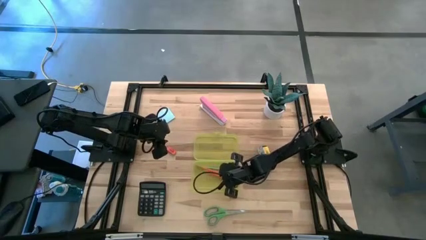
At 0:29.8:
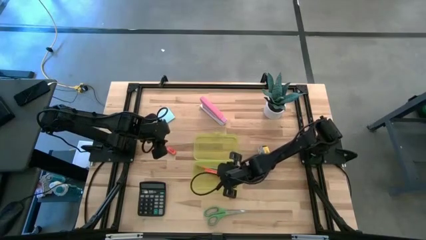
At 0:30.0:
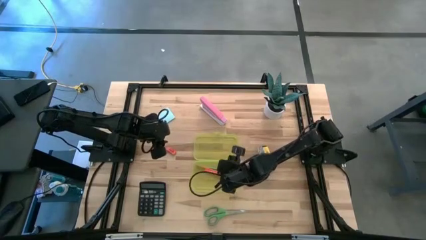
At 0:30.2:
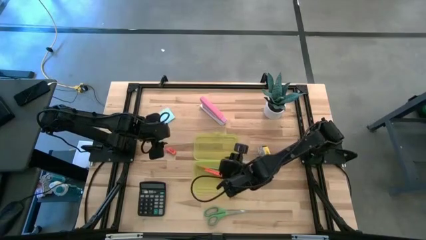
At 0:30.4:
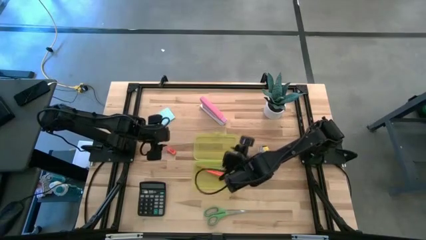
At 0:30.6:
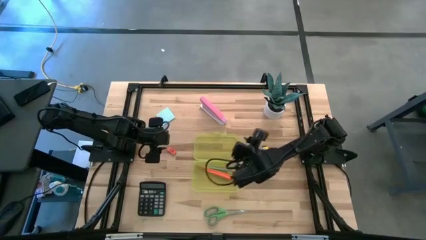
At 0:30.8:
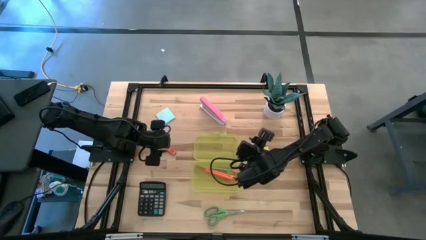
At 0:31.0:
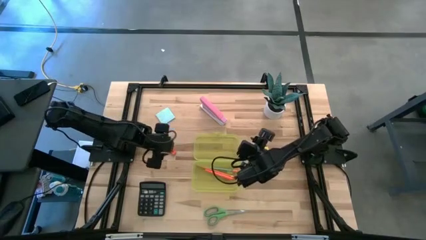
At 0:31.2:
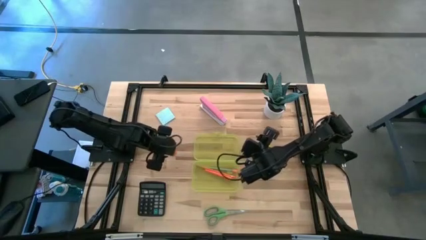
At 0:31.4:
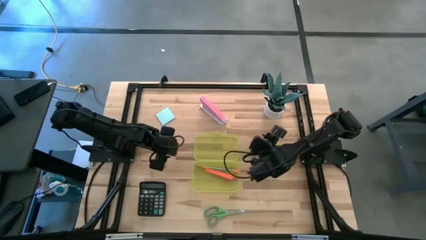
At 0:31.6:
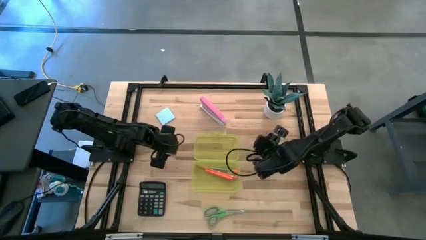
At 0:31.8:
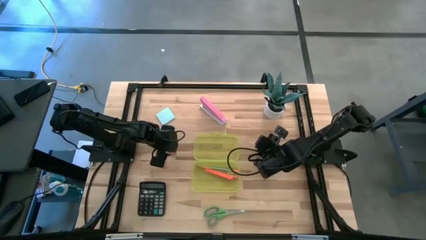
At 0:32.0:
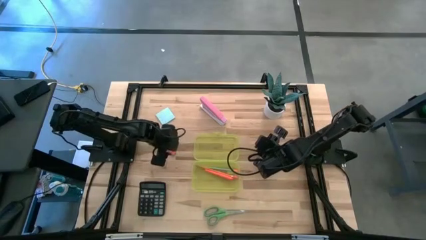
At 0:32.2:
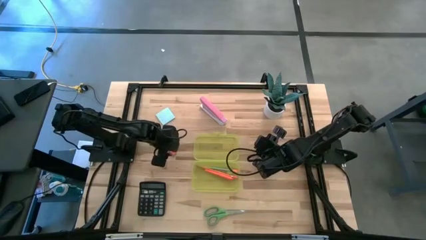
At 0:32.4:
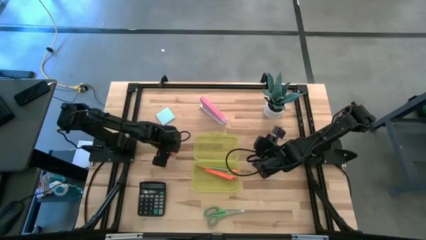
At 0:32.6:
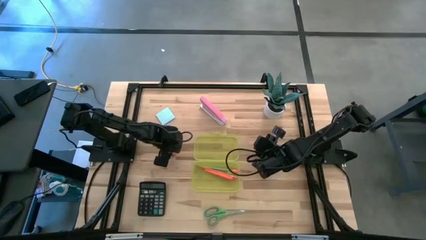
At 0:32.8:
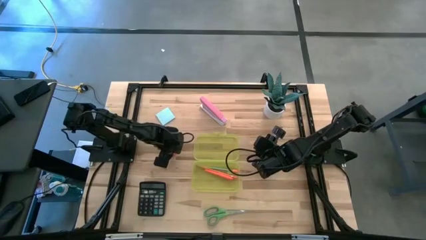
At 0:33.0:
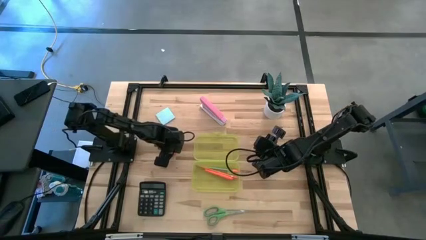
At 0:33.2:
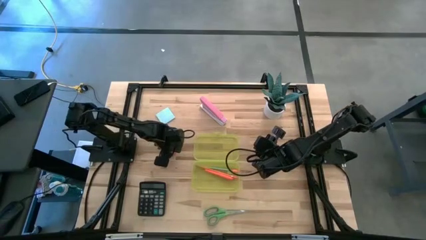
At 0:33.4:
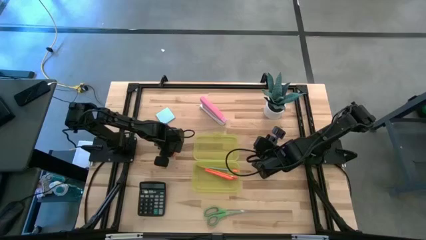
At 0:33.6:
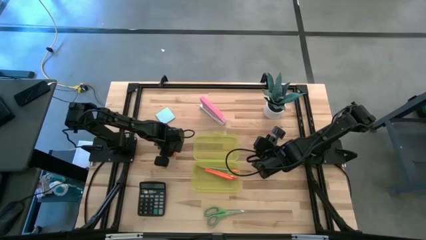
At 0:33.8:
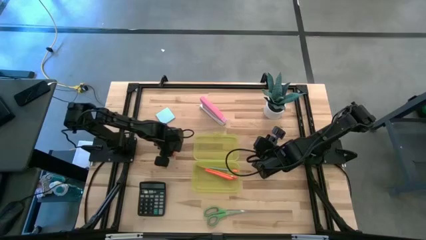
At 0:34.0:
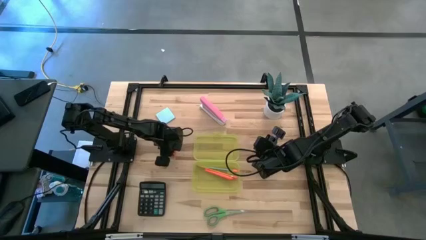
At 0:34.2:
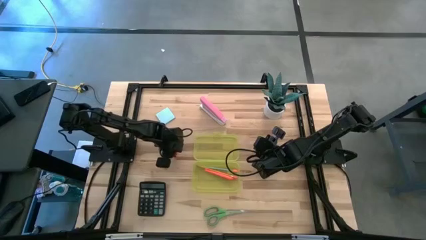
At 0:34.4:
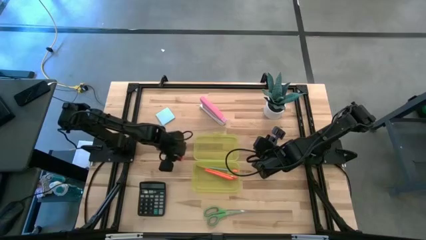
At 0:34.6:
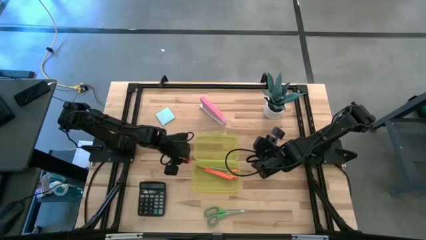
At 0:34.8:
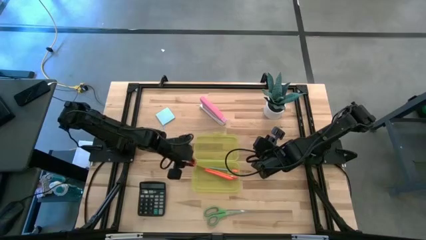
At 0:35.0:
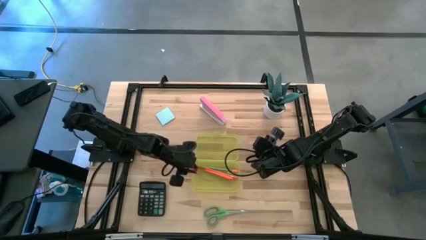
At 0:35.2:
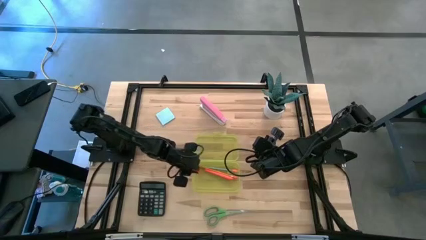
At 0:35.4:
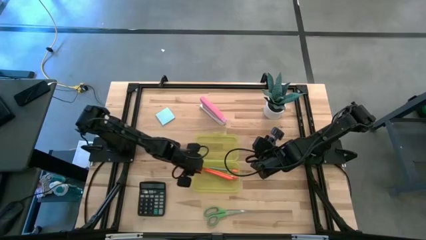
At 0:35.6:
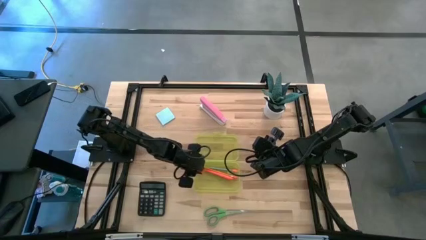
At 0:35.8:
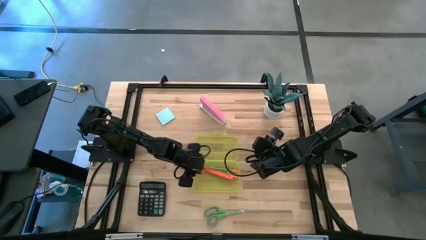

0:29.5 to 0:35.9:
Task: Pack school essentials
Put the orange eraser into the yellow supply box

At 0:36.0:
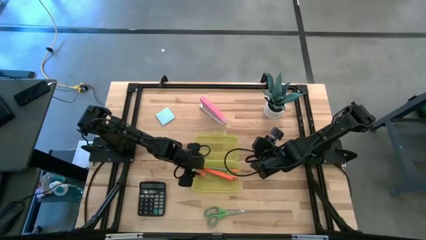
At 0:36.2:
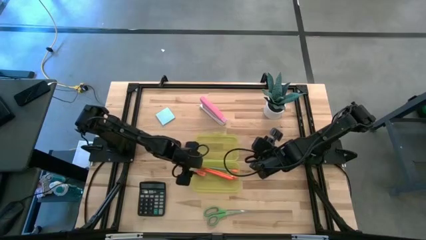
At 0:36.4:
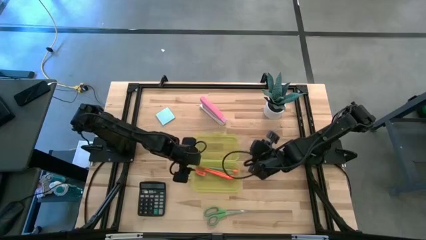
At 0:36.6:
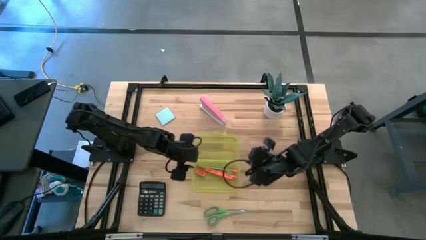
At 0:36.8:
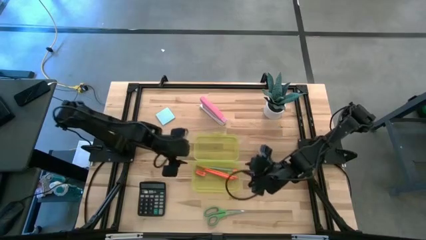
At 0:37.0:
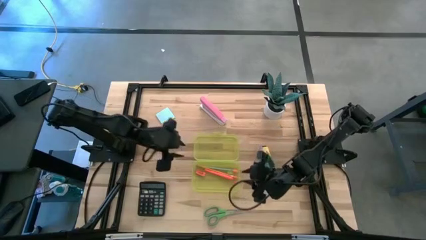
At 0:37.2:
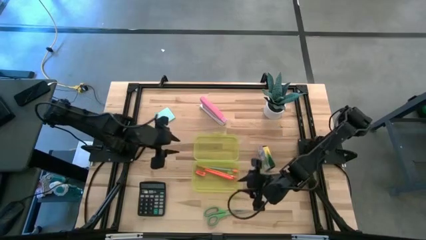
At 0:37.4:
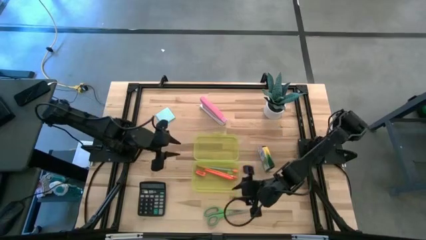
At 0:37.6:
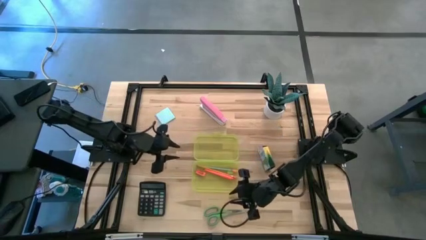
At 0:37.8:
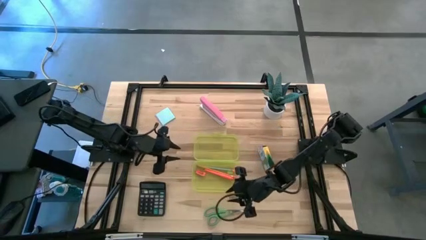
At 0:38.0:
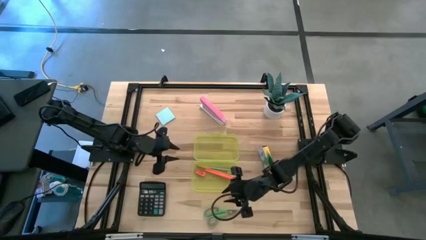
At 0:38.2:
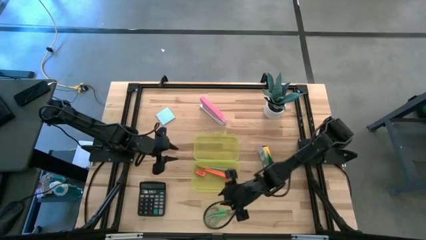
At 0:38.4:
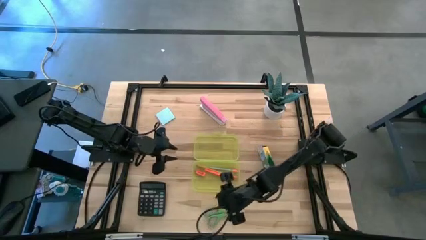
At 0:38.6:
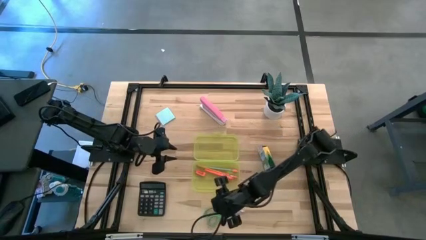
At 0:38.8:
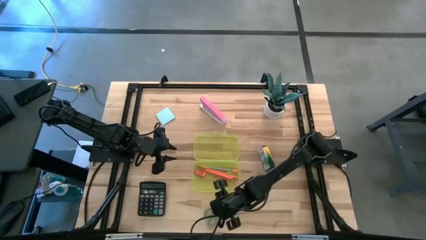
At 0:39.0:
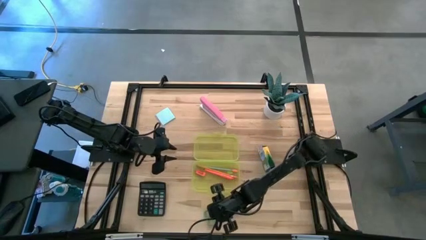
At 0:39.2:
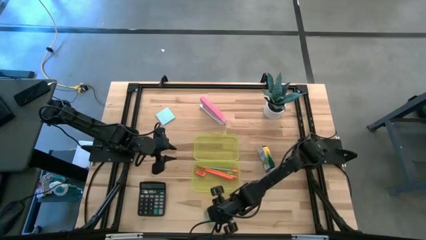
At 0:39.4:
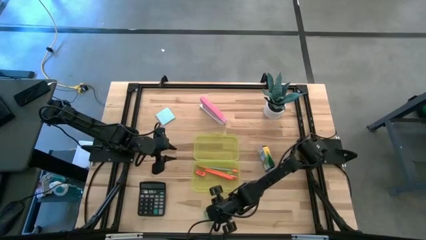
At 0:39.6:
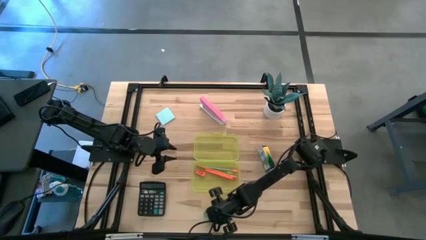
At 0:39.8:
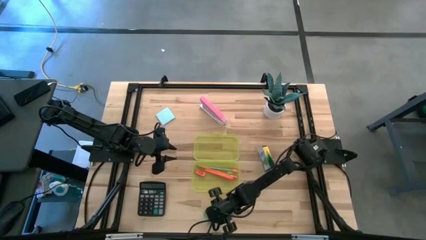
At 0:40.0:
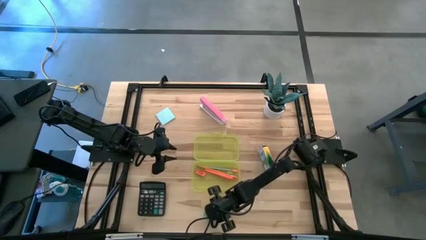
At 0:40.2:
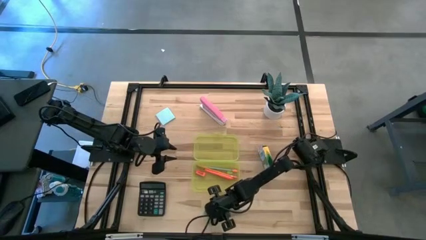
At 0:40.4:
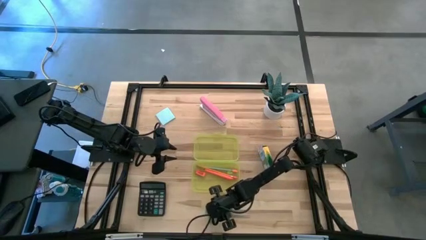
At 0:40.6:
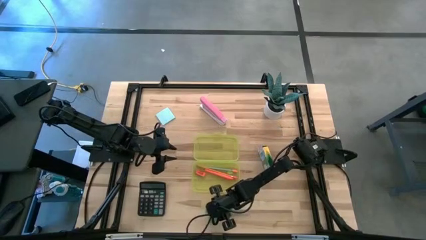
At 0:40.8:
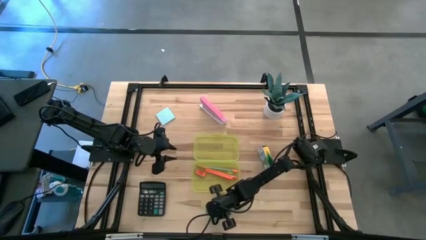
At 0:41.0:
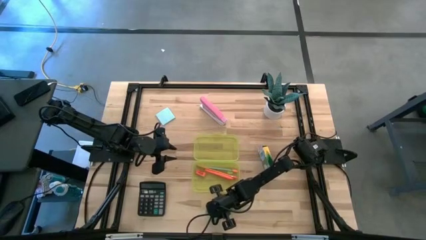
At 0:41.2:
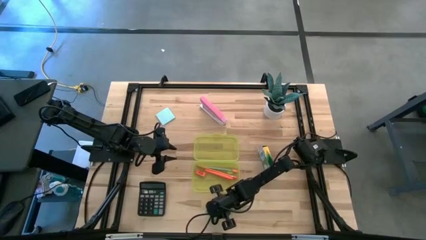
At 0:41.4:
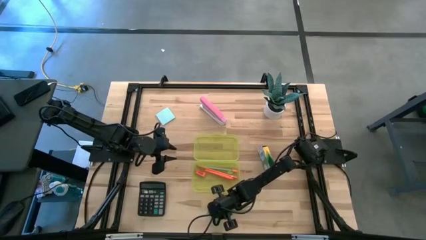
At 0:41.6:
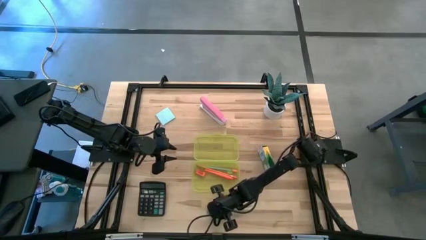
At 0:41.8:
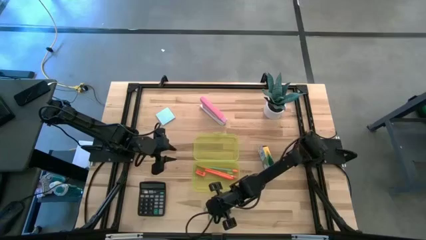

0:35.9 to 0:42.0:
Put the green scissors into the yellow supply box

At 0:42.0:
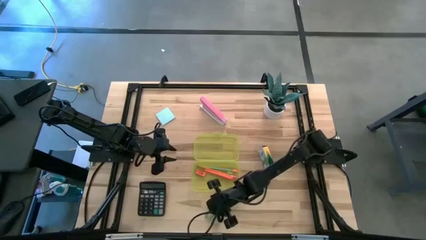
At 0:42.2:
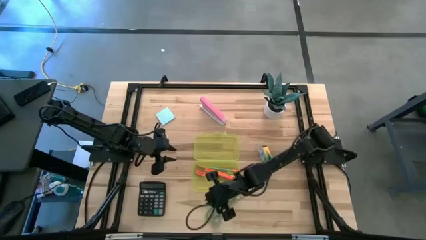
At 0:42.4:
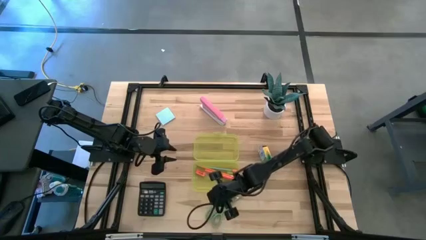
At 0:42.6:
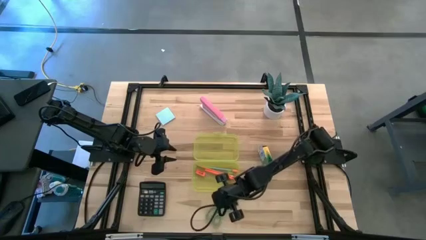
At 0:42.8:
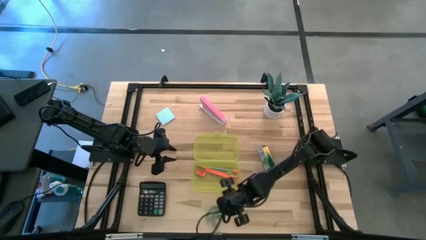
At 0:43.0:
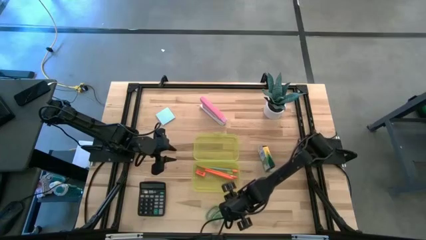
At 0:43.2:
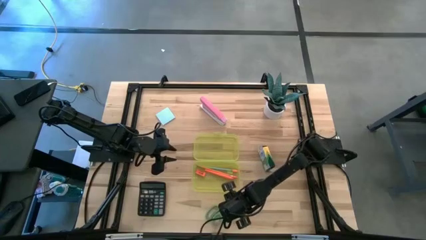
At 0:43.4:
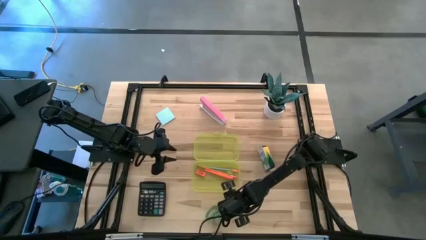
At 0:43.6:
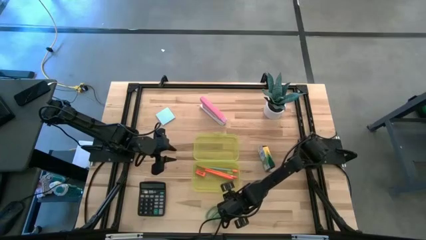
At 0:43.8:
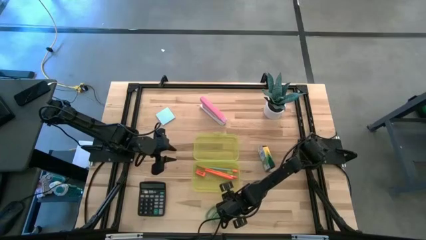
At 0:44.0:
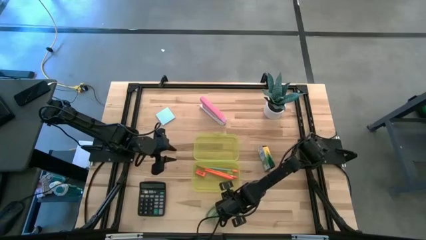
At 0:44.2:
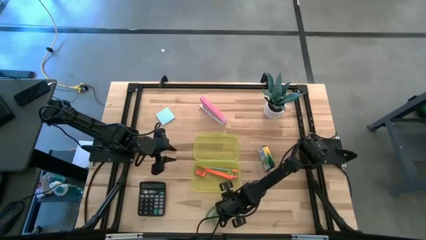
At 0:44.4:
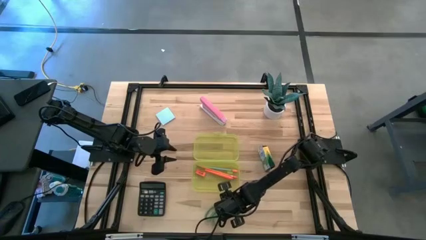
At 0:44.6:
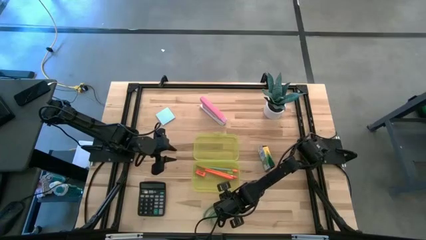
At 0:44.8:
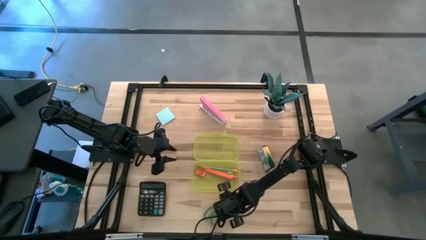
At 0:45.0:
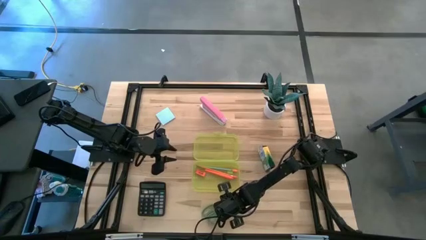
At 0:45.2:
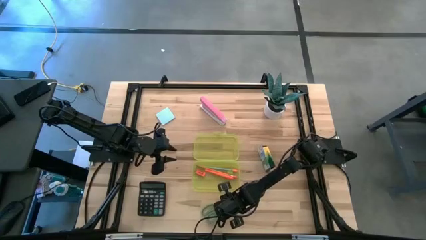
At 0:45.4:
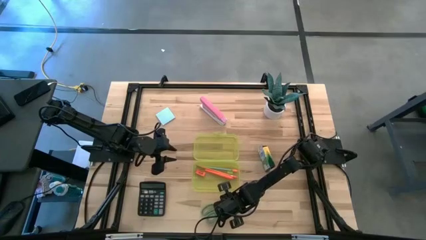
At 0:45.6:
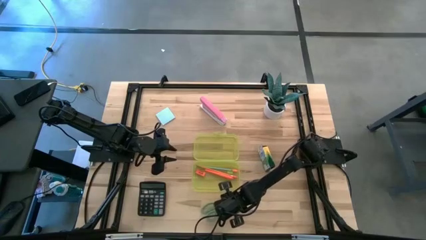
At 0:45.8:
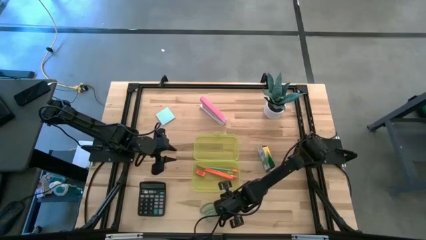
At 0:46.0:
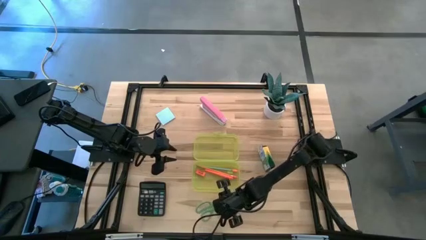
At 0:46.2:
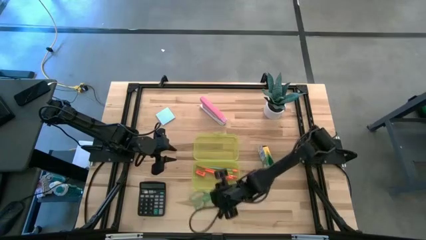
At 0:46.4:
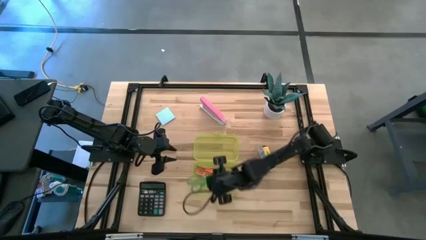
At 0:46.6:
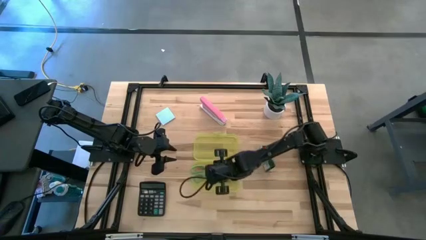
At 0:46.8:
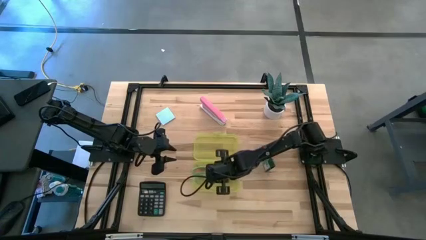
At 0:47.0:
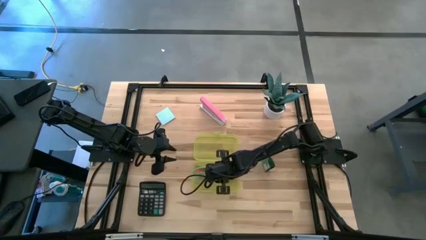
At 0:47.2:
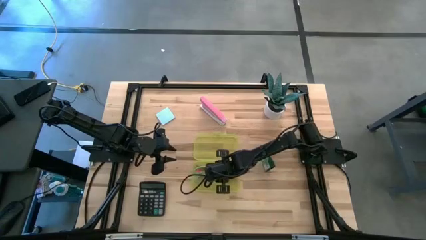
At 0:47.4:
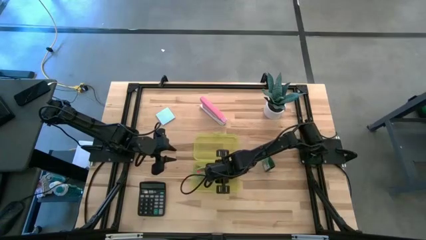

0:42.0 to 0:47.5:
Put the green scissors into the yellow supply box
